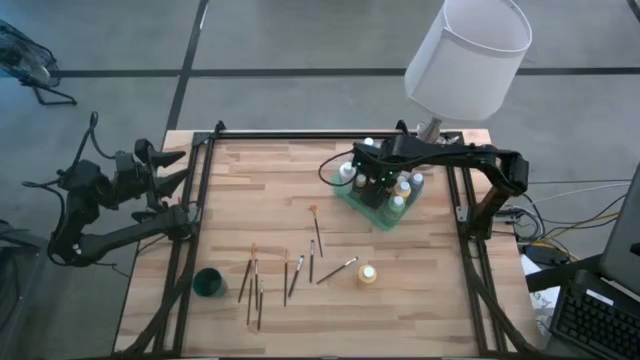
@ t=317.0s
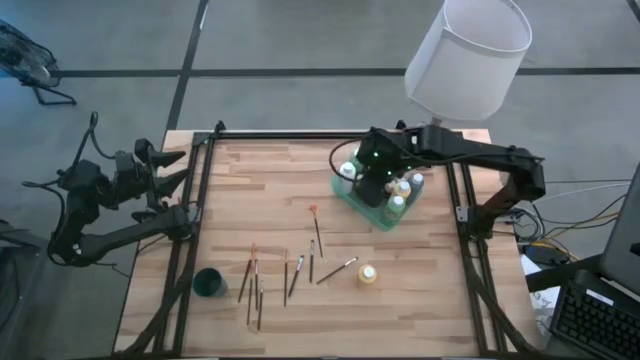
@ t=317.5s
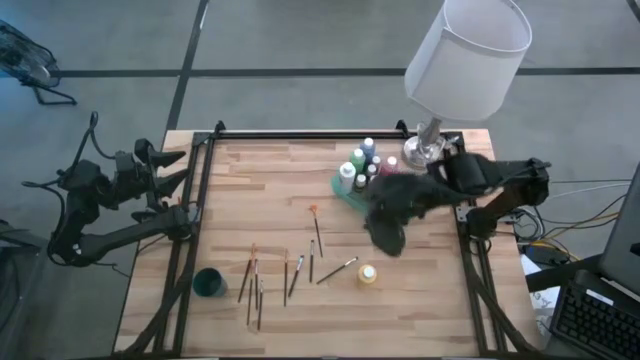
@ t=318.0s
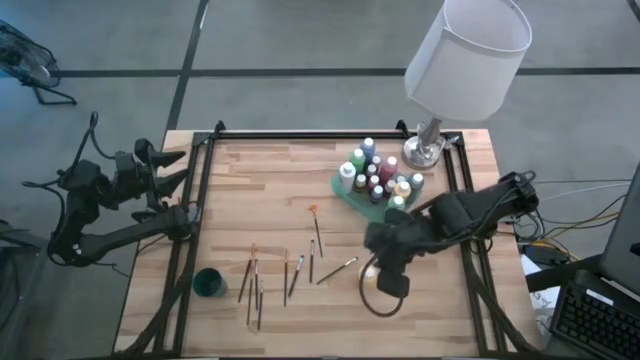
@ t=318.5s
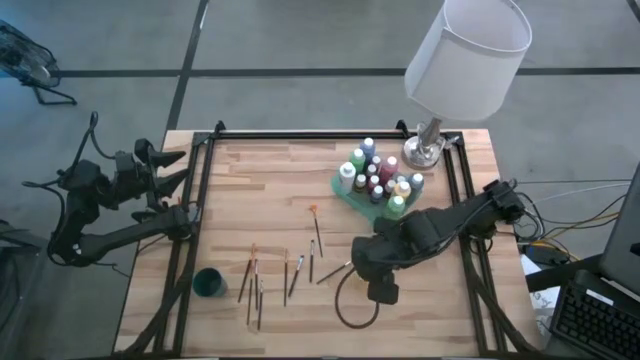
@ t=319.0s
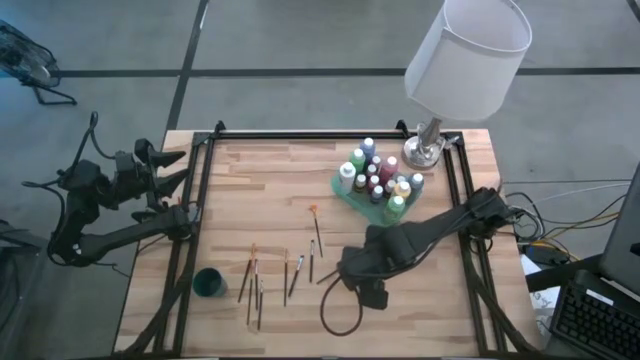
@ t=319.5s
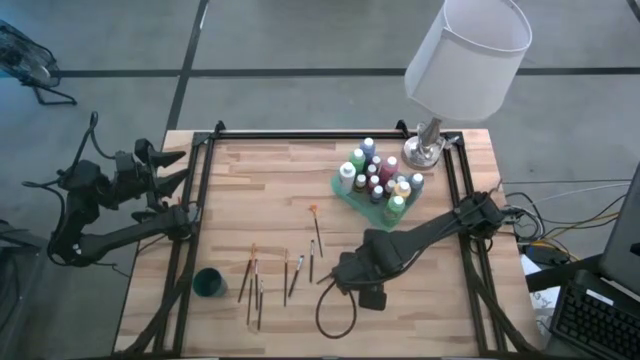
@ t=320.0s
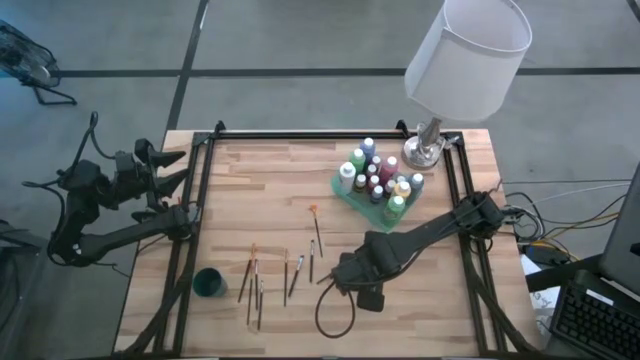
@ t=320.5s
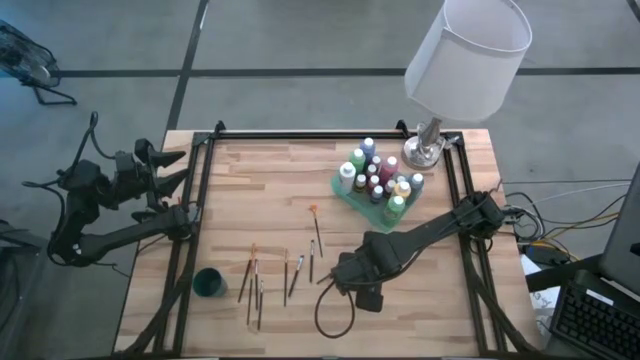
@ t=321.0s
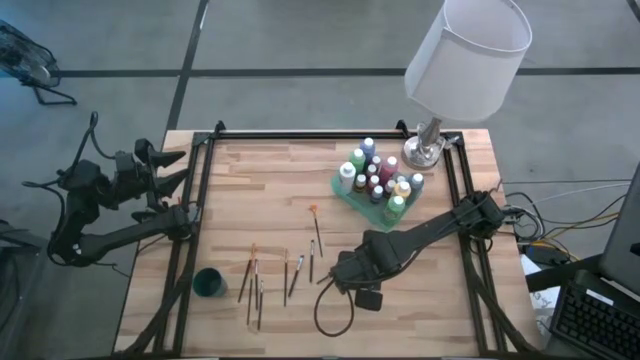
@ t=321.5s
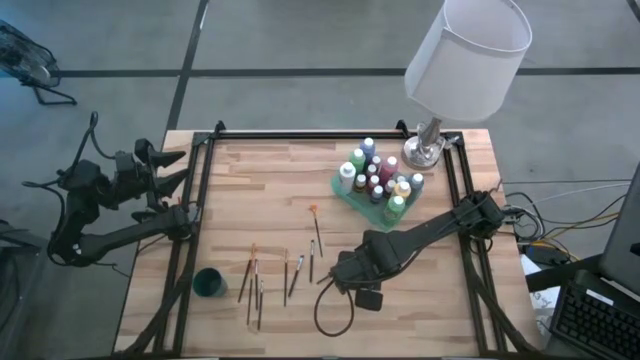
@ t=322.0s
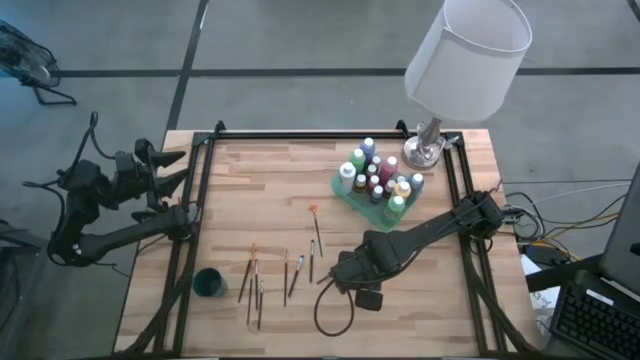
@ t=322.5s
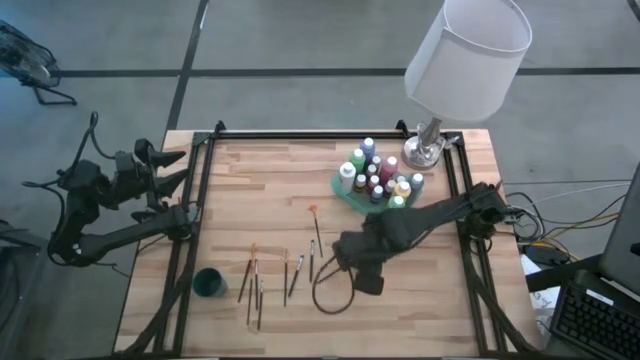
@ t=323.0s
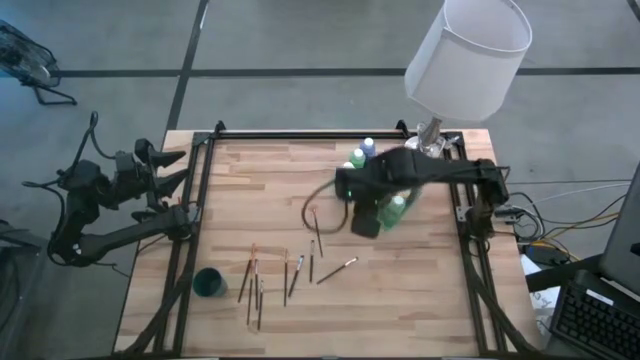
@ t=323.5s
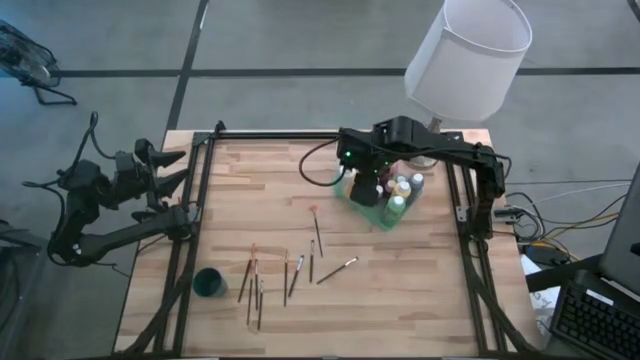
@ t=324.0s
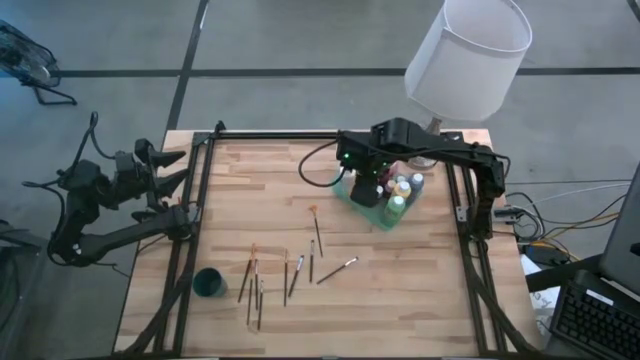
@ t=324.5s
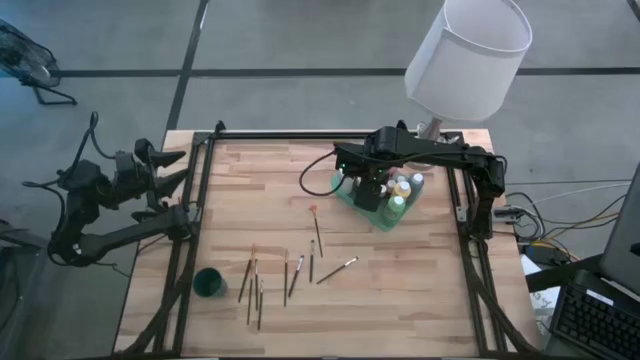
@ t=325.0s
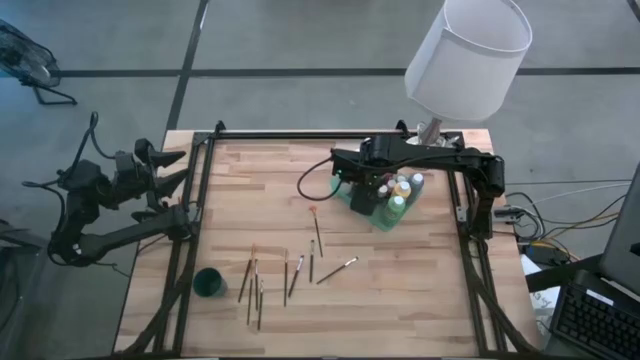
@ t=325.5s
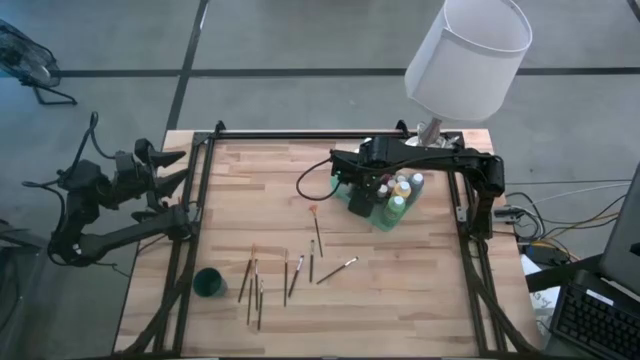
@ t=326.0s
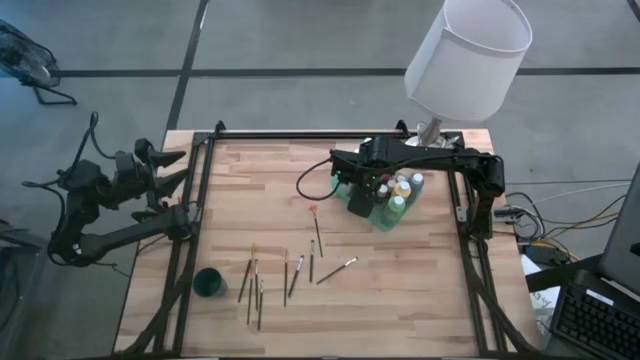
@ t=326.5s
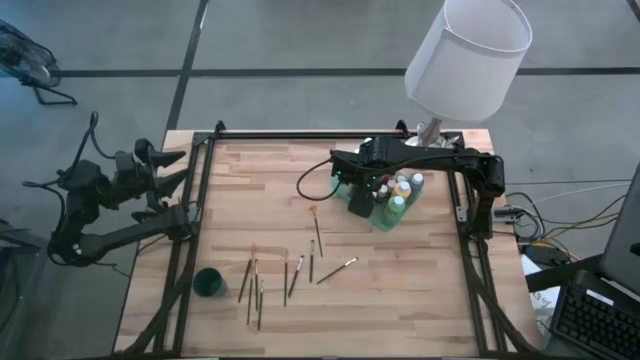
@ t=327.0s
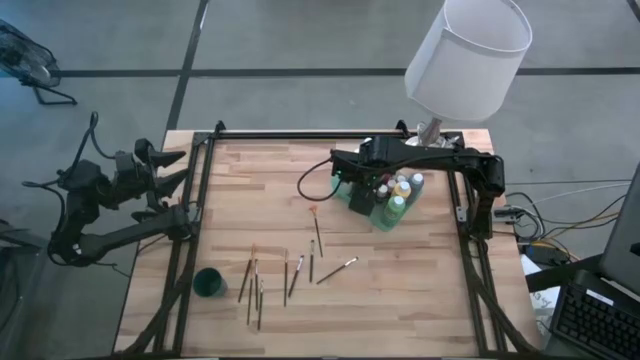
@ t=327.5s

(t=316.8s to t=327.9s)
Task: Pick & Place Paint Supplies
Put the big yellow paint bottle into the green transparent bin

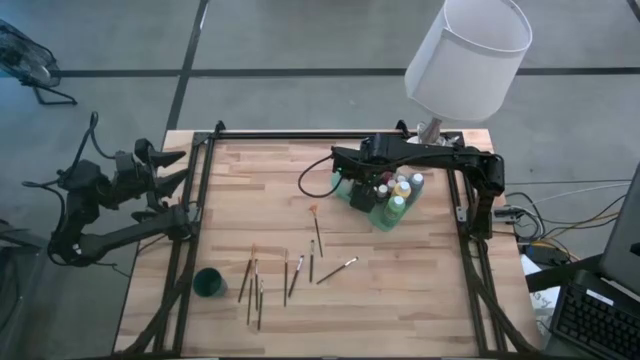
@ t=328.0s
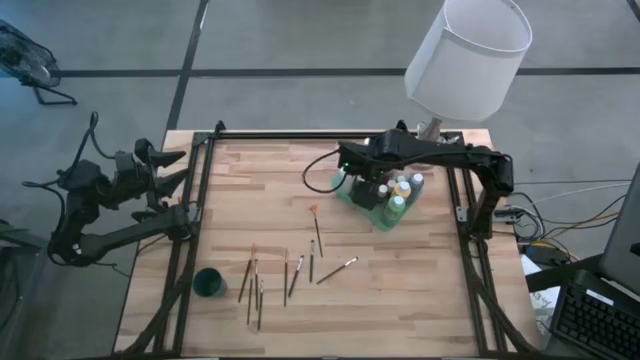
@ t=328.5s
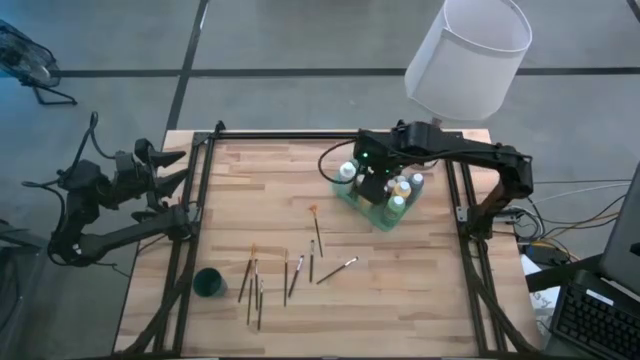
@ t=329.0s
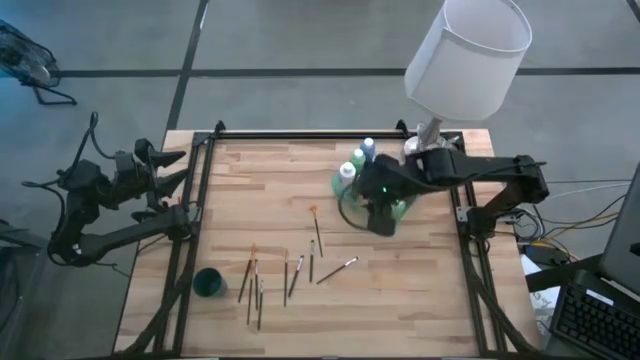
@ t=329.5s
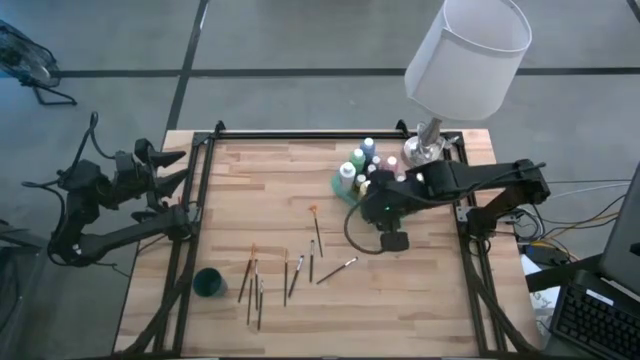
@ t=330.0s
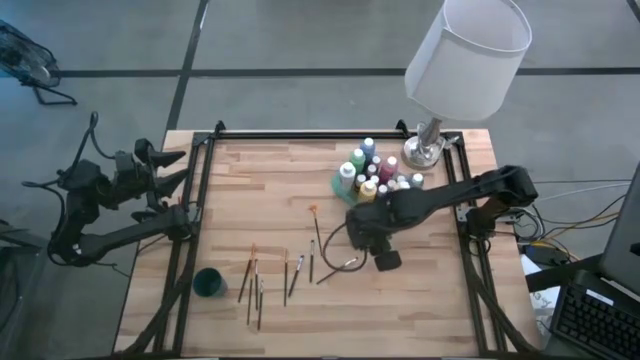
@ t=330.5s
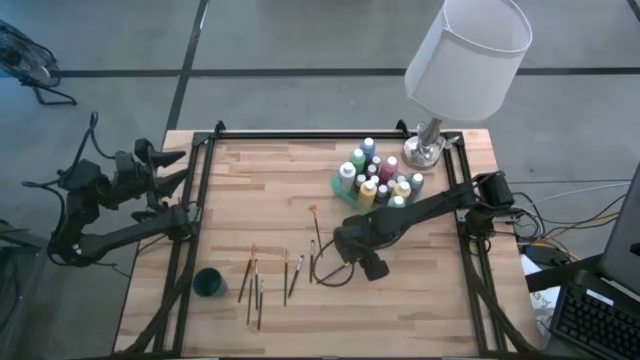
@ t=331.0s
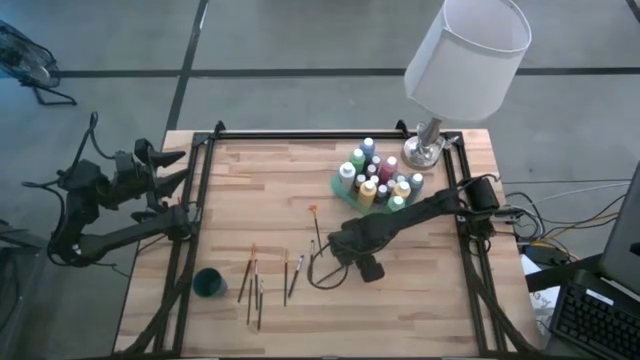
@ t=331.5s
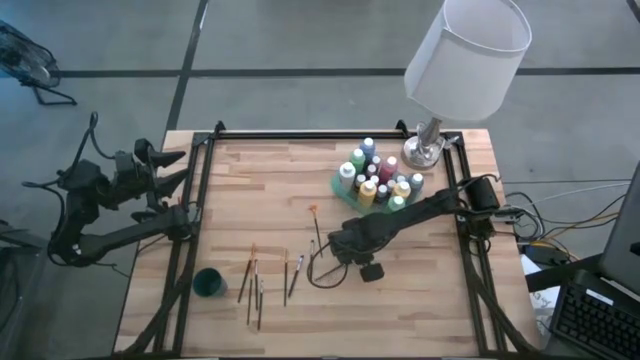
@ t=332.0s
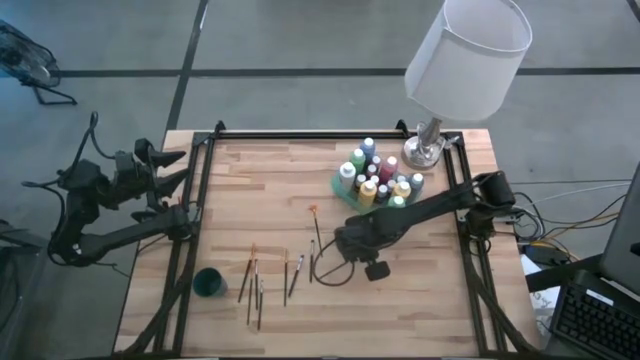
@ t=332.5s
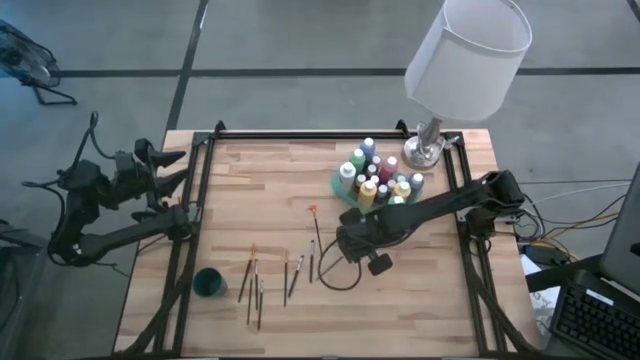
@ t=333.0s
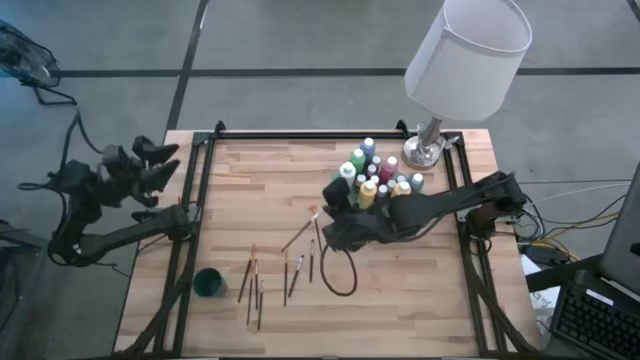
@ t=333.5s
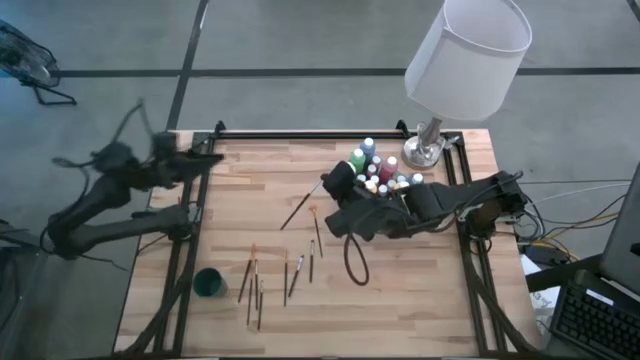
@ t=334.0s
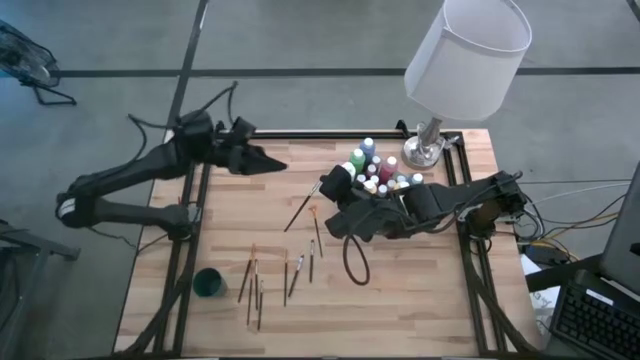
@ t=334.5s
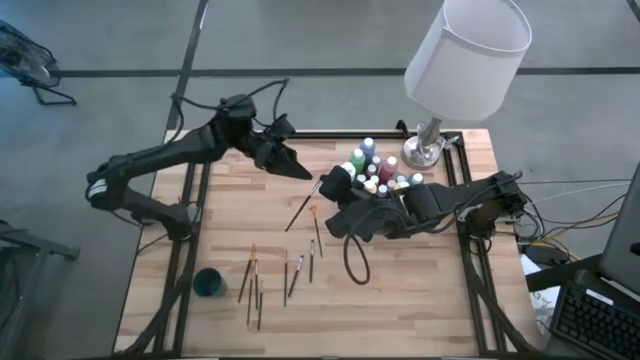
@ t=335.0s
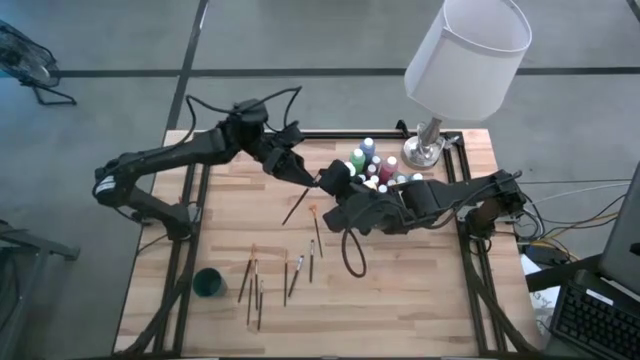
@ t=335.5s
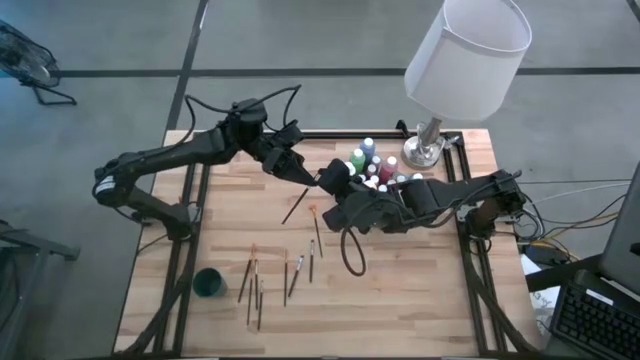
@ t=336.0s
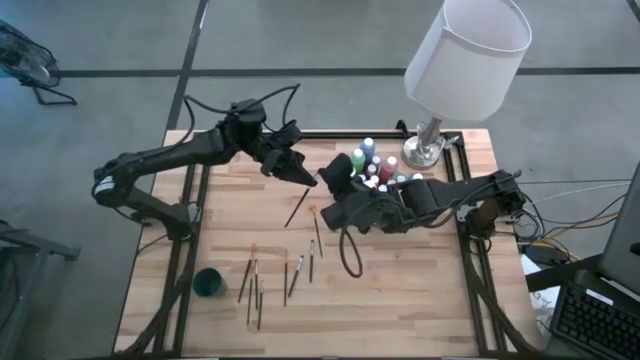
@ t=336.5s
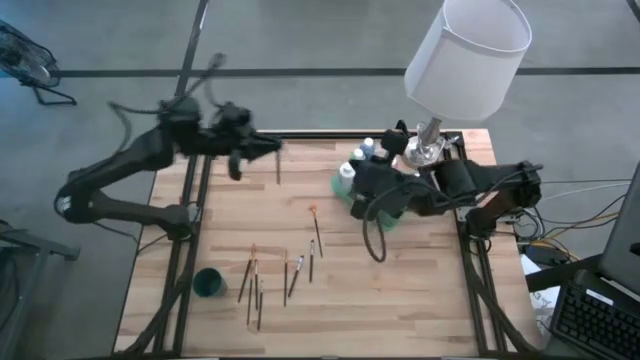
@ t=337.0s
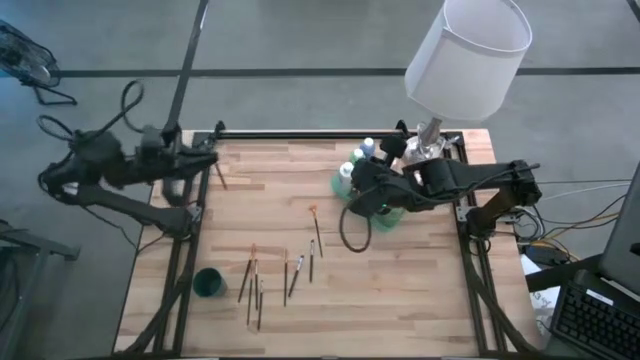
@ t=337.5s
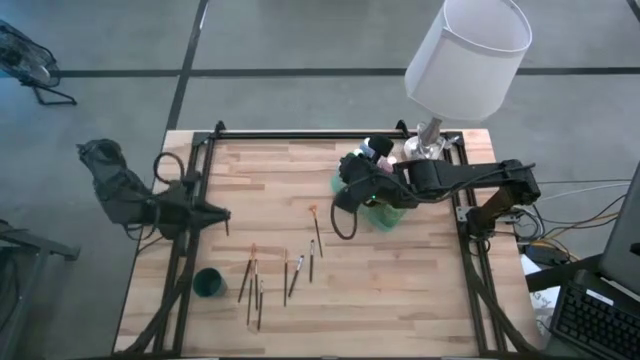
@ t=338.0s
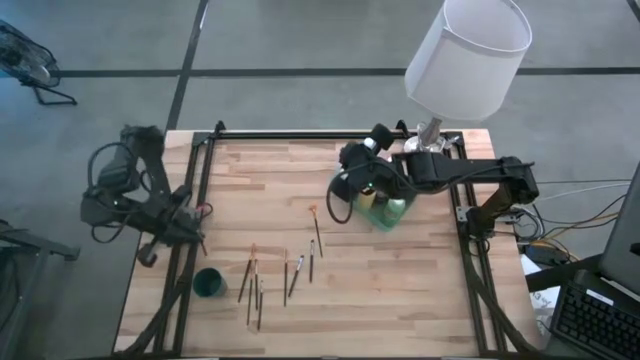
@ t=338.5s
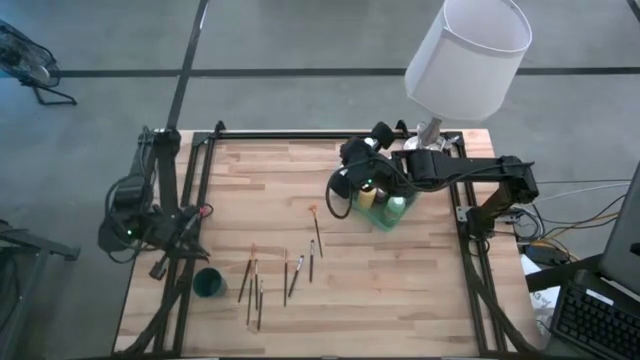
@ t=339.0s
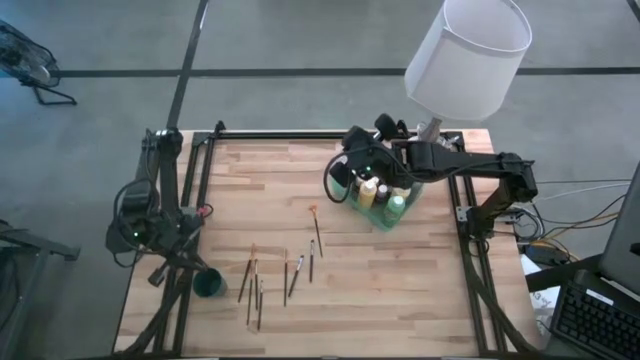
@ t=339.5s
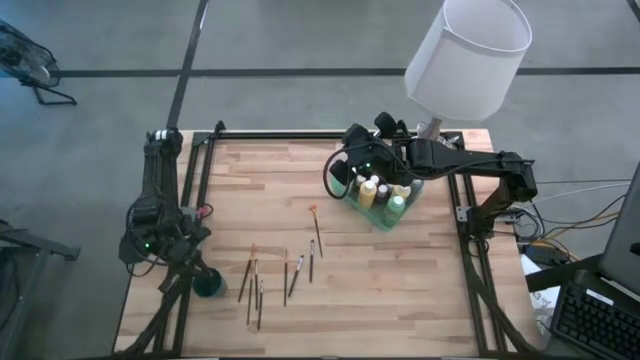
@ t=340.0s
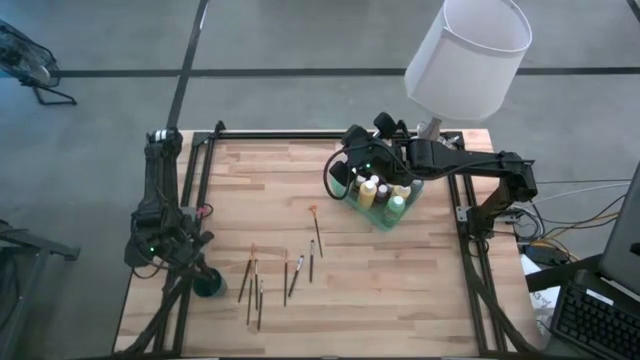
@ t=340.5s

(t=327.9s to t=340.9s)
Put the silver paint brush into the green cup
